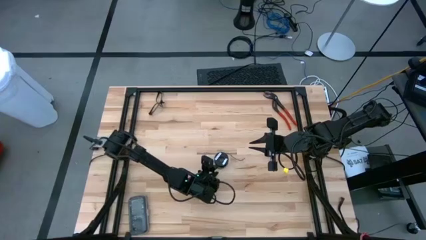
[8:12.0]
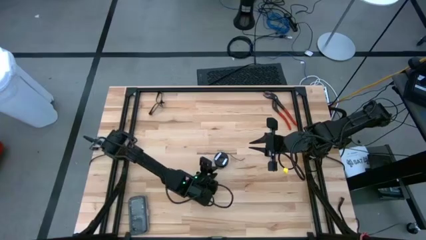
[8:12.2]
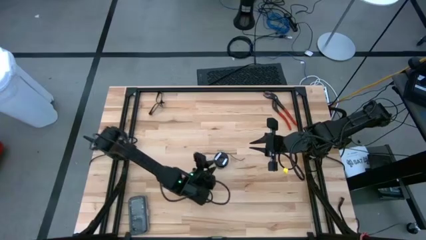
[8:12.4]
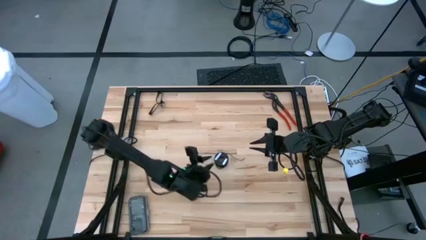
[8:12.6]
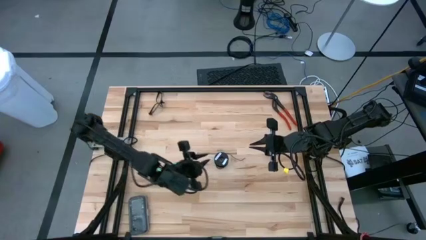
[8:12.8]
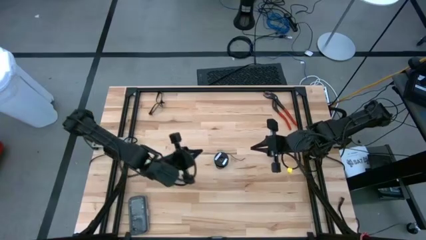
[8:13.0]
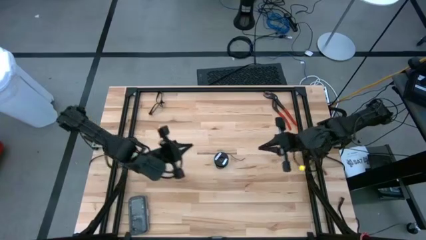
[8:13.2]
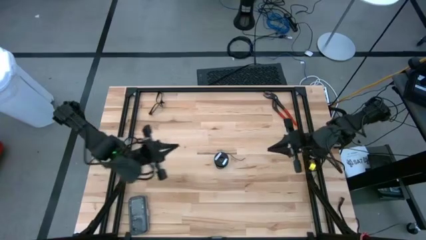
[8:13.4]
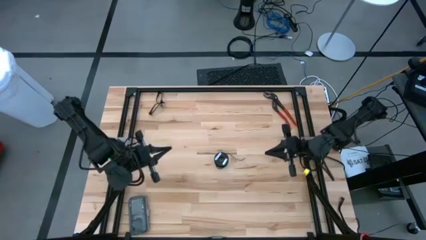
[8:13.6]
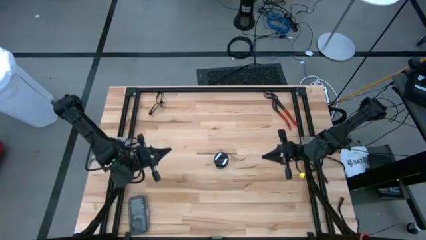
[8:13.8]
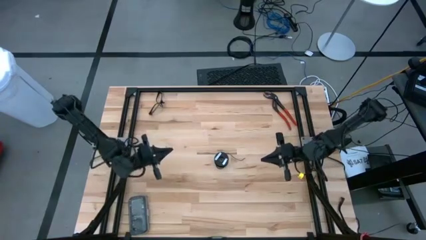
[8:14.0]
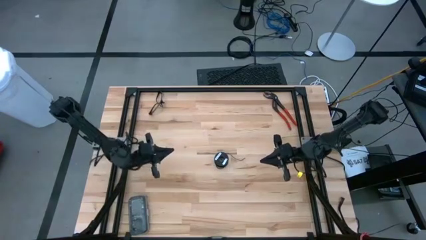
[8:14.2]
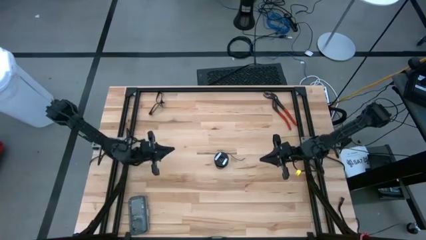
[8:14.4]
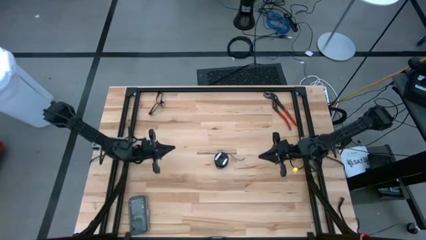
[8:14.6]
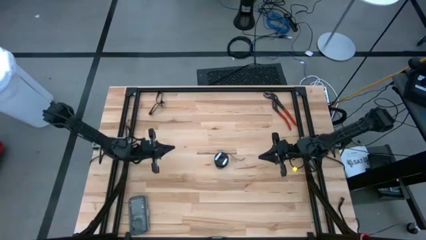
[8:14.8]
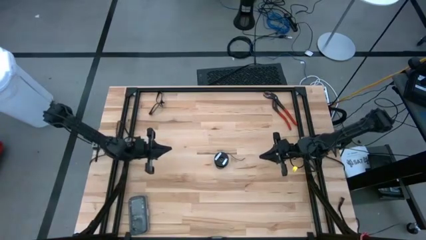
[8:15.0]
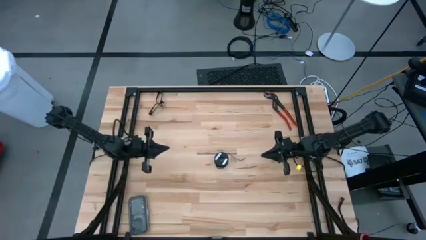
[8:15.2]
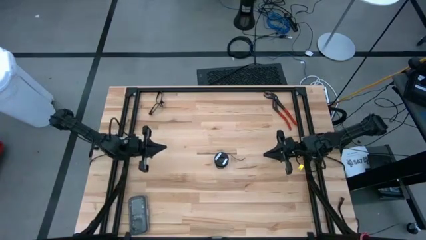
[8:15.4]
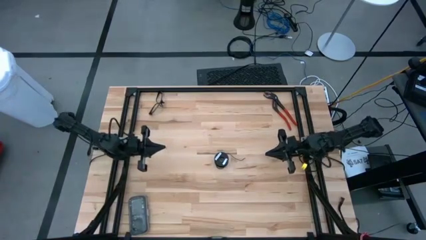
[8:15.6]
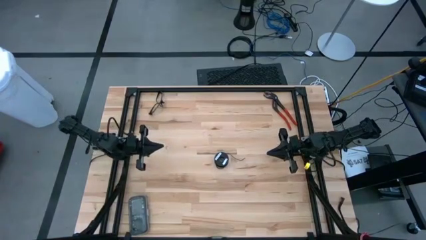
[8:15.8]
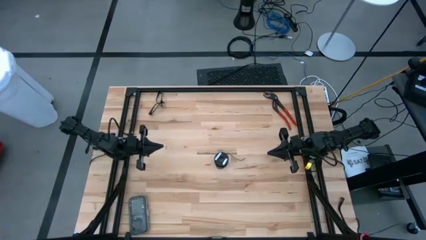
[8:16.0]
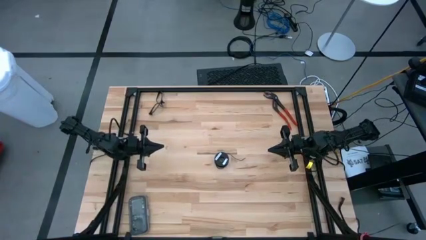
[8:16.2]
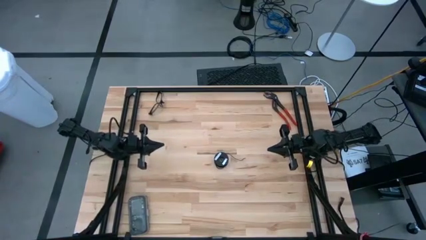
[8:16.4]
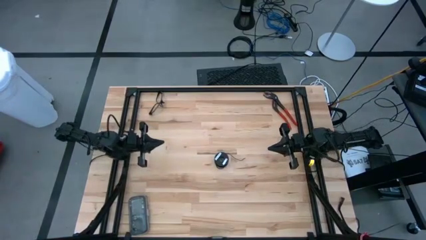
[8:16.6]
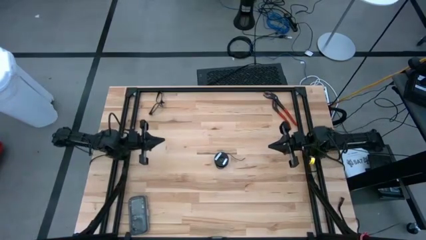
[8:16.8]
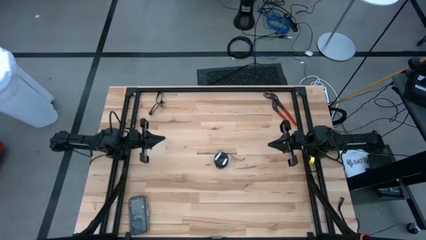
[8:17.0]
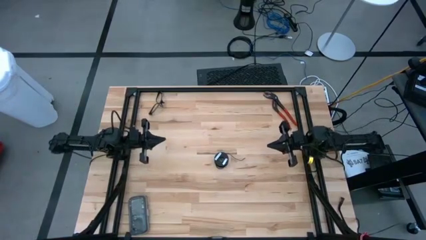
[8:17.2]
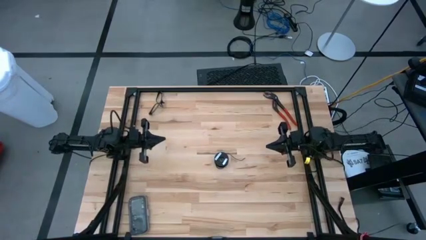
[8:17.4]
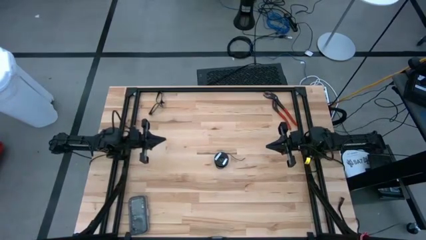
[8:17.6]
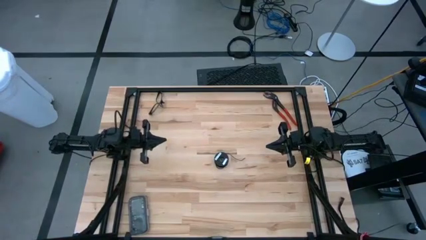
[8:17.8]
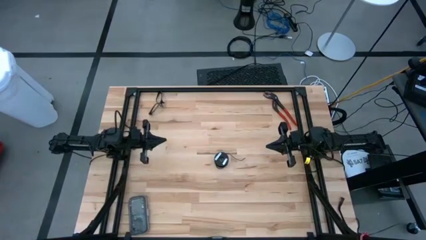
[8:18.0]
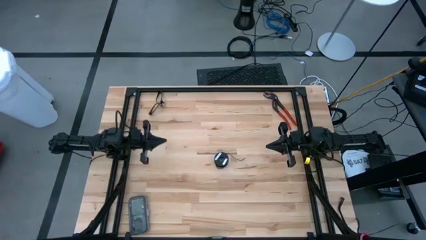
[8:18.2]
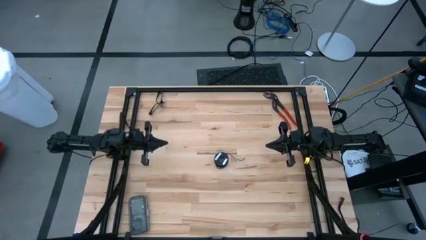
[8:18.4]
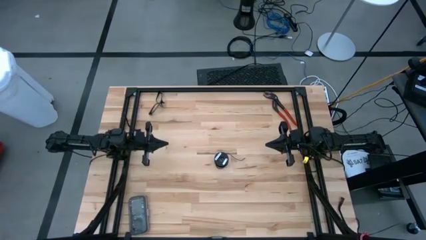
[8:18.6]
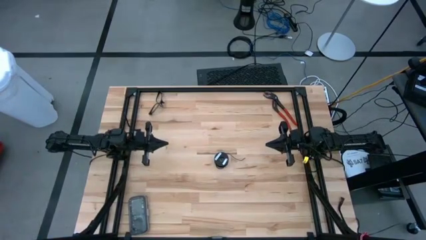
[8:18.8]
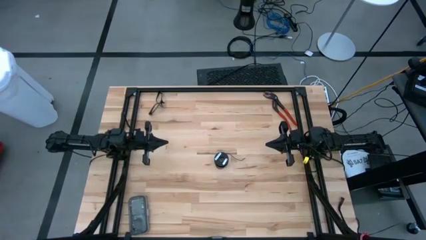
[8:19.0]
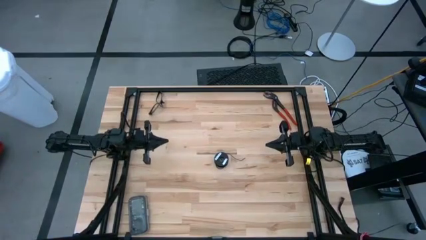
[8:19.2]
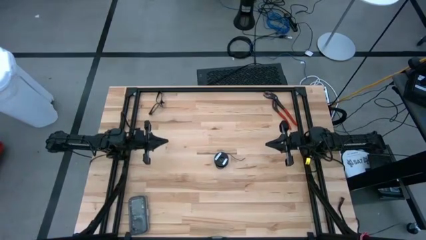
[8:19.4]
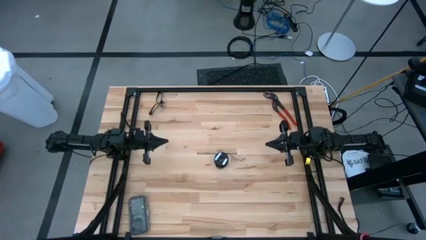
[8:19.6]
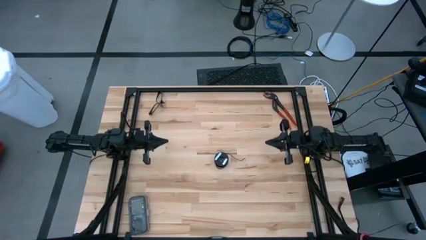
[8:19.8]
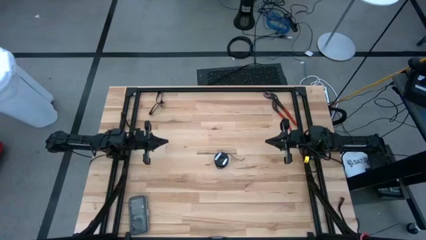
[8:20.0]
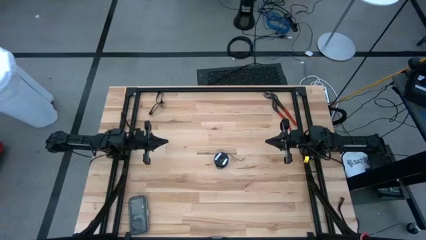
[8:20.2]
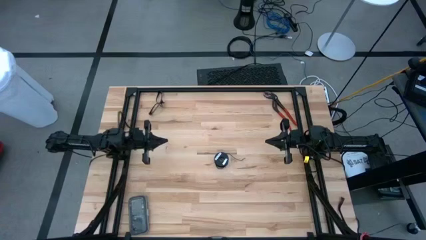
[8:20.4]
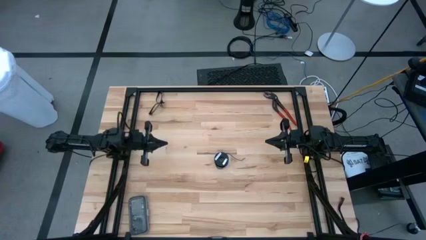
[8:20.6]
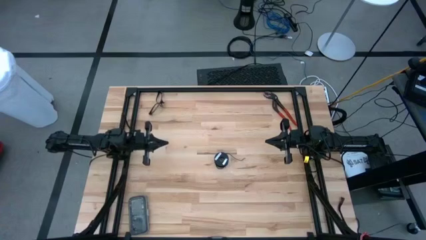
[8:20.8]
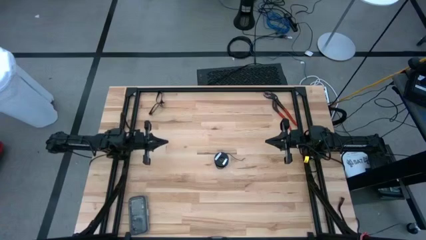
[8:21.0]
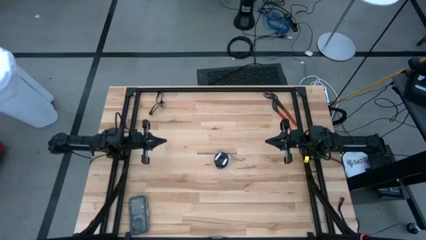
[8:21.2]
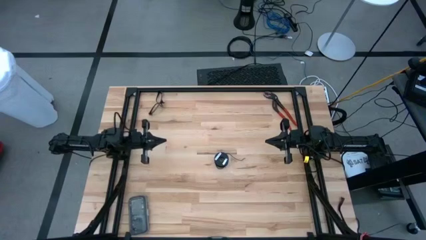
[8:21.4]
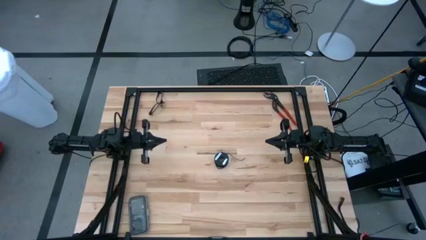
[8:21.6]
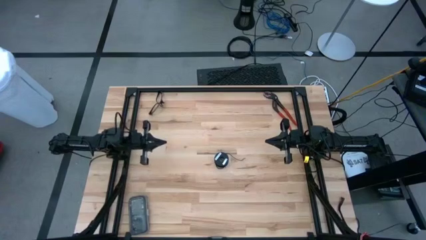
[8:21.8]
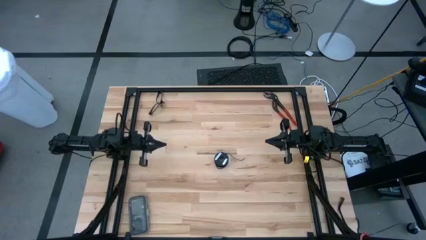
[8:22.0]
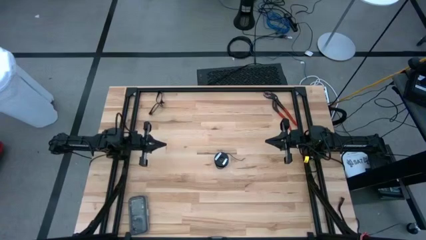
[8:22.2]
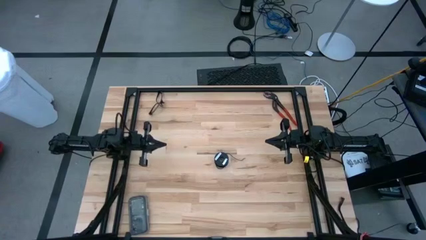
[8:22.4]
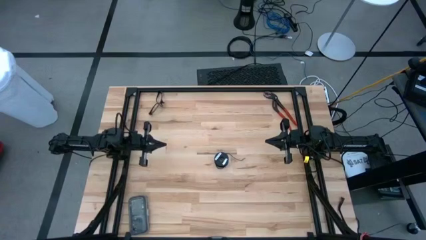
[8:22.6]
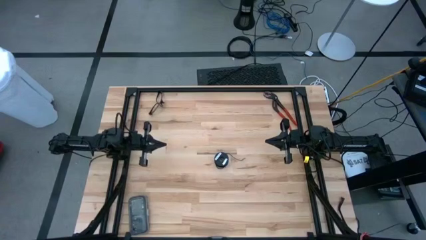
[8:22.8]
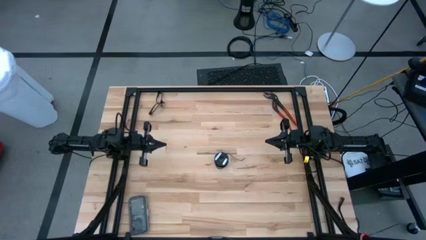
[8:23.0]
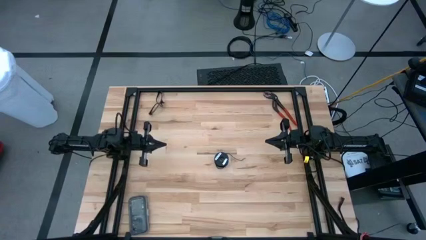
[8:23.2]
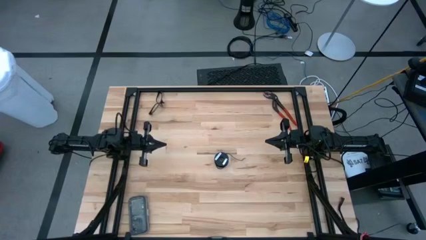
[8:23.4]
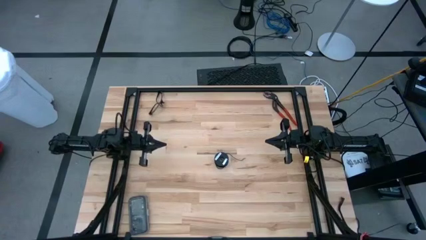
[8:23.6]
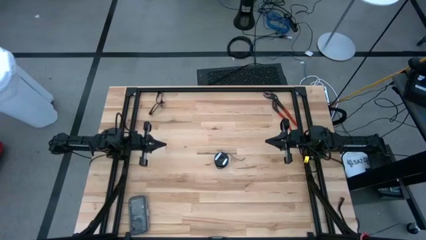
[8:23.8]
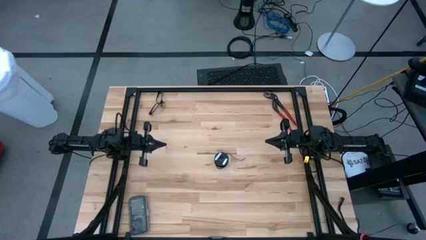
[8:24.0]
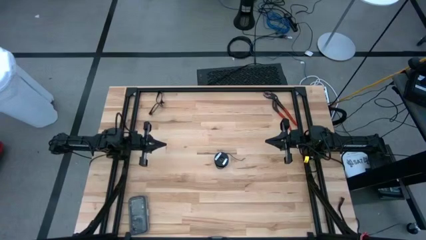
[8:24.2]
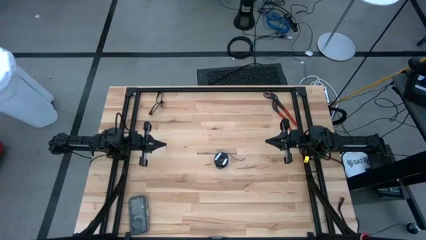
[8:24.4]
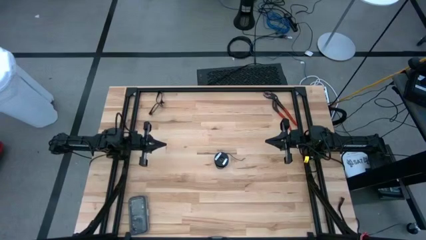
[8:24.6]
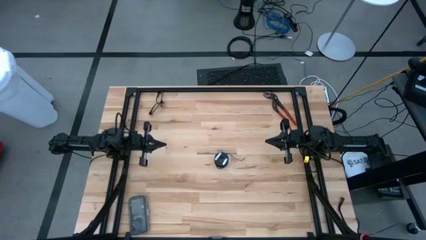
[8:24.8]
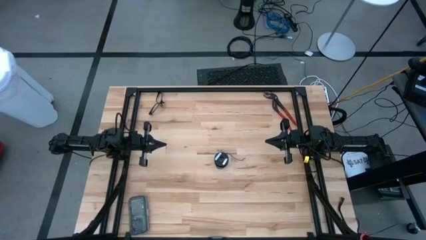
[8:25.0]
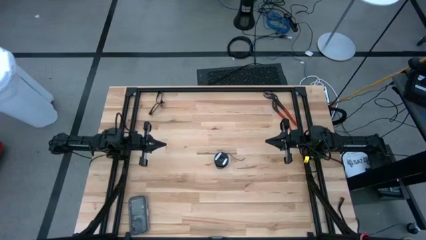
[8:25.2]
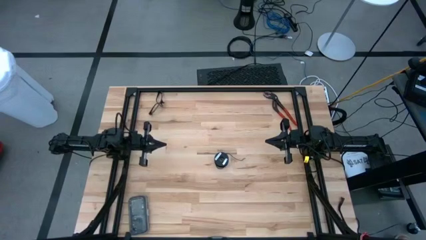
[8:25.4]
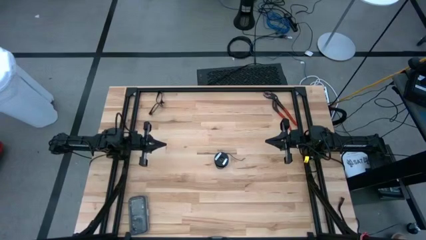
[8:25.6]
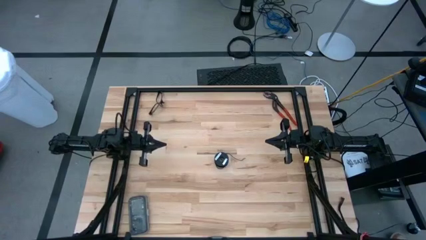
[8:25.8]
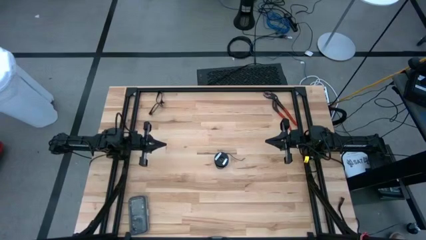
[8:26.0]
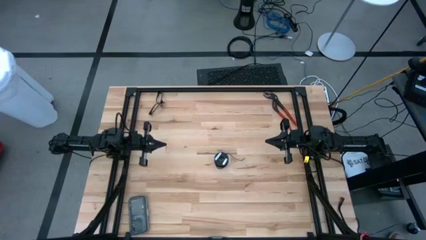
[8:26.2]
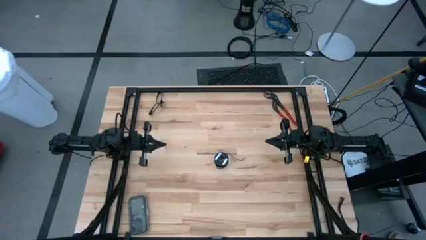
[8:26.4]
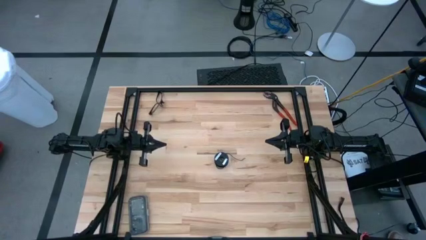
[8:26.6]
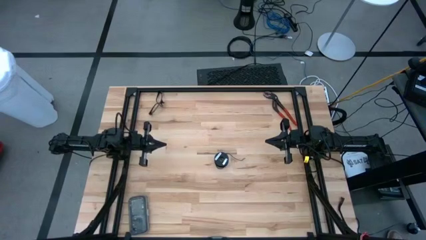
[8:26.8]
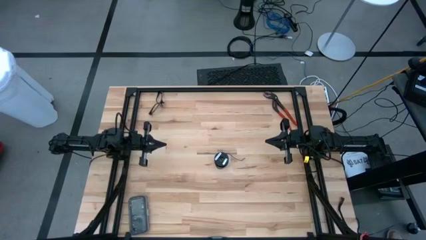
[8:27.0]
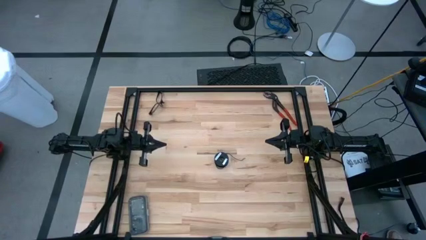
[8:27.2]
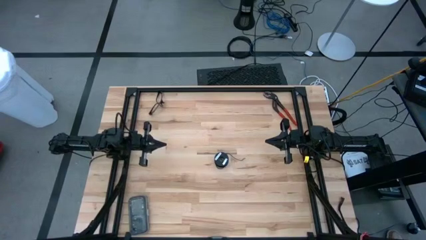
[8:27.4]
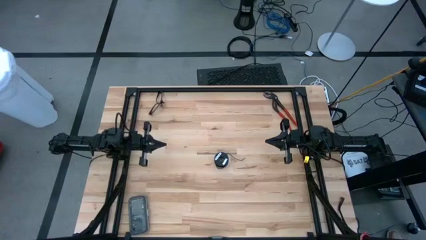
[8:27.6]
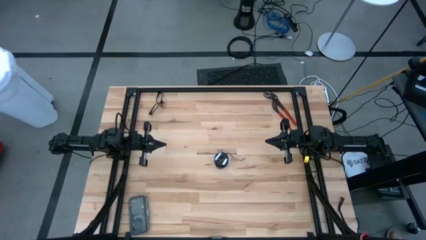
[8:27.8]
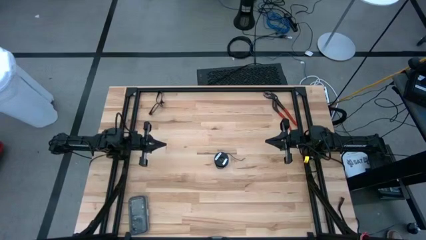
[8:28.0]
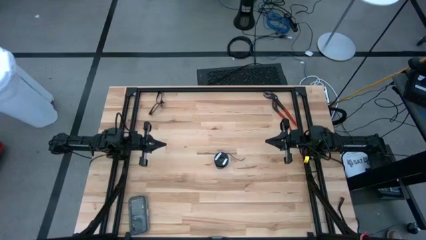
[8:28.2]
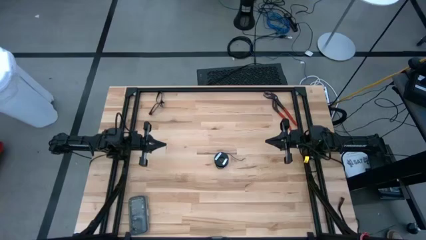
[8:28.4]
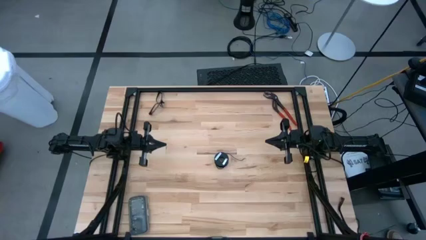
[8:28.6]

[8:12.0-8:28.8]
Task: Coil cords
Return to Home Position
